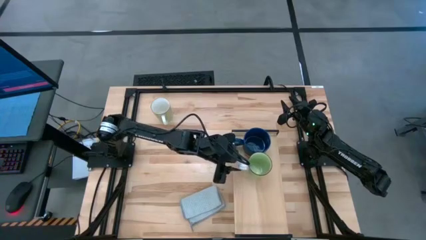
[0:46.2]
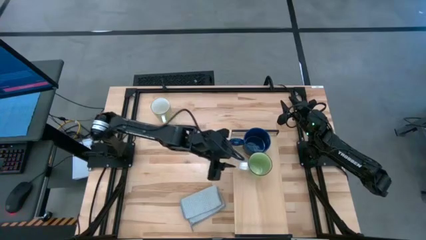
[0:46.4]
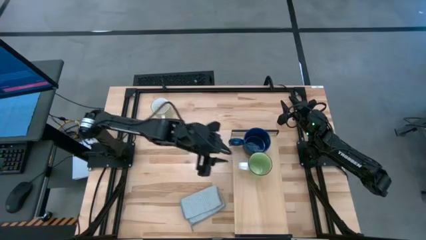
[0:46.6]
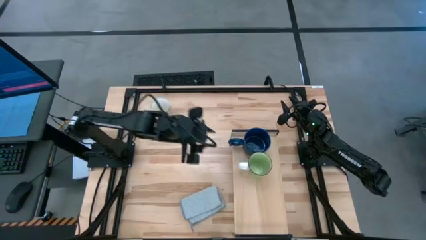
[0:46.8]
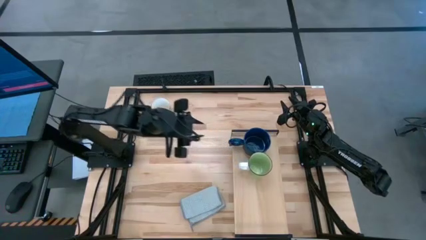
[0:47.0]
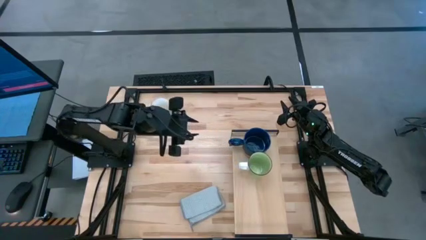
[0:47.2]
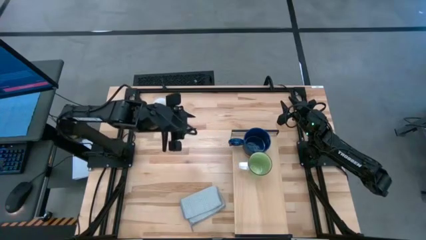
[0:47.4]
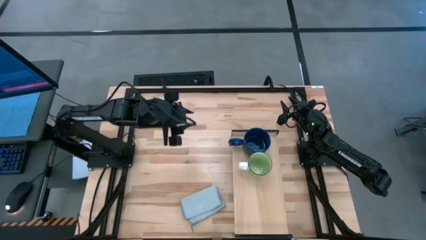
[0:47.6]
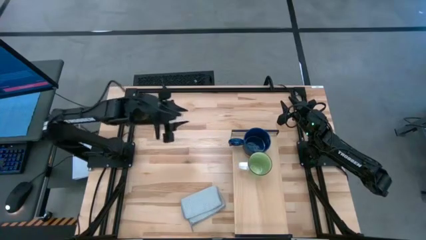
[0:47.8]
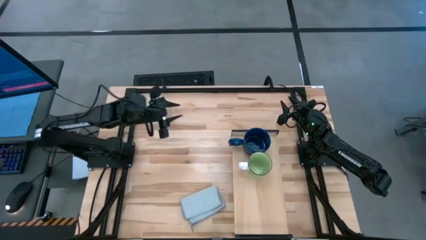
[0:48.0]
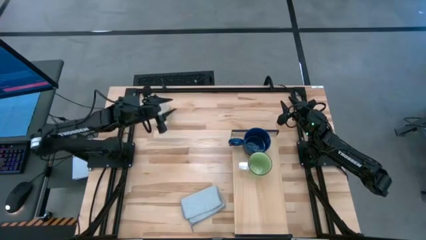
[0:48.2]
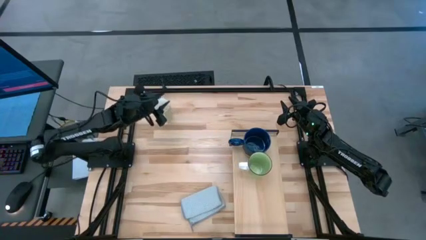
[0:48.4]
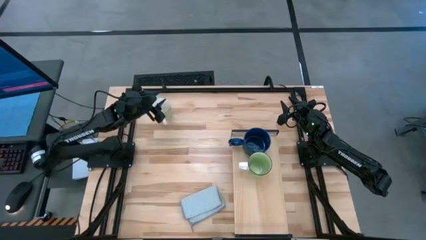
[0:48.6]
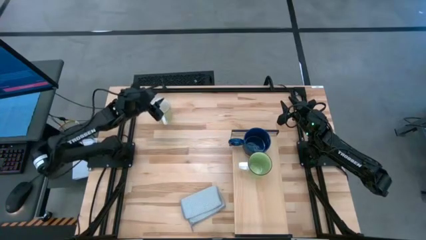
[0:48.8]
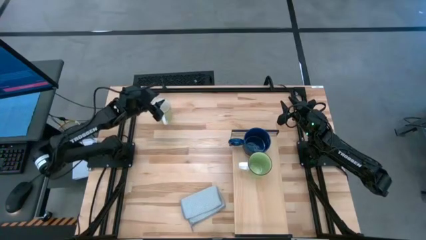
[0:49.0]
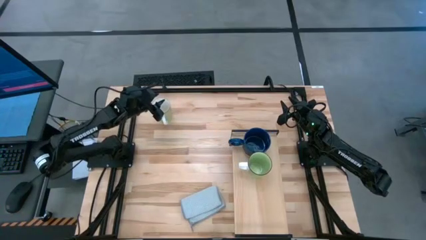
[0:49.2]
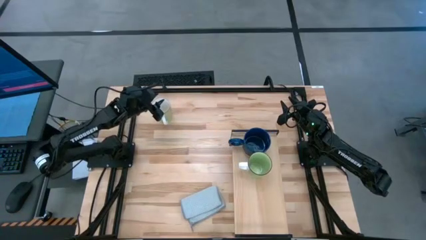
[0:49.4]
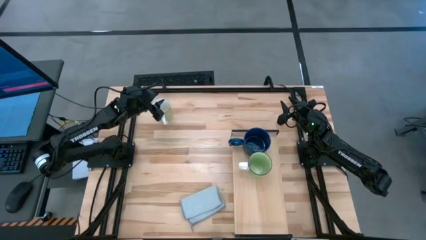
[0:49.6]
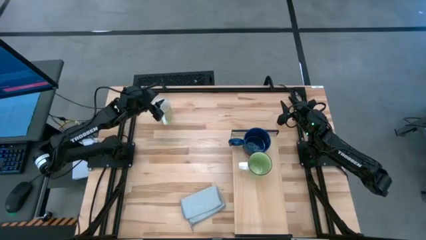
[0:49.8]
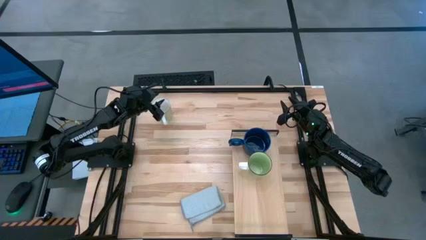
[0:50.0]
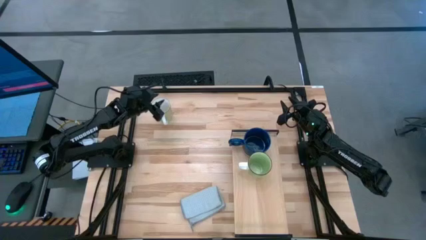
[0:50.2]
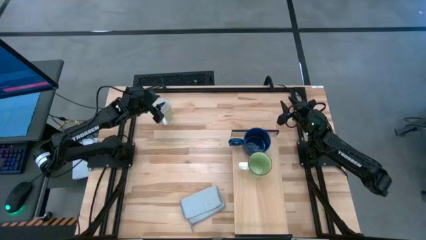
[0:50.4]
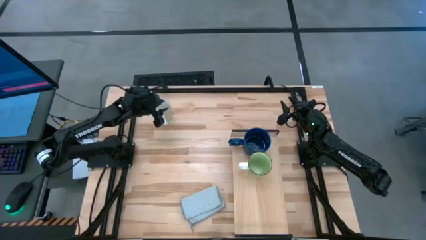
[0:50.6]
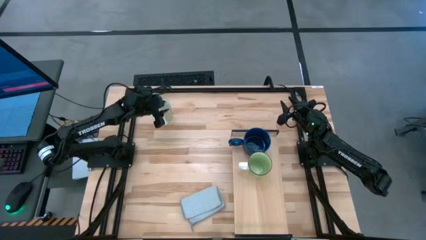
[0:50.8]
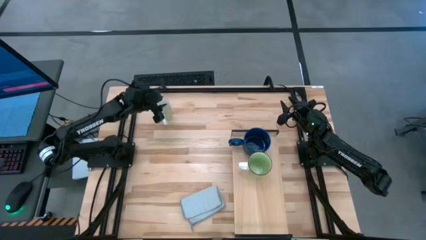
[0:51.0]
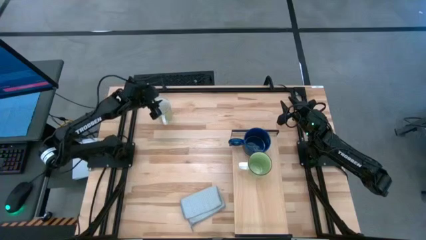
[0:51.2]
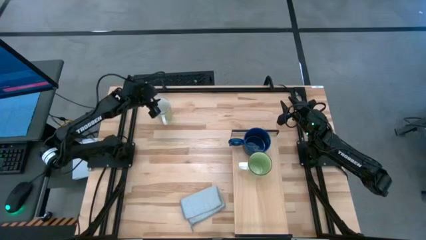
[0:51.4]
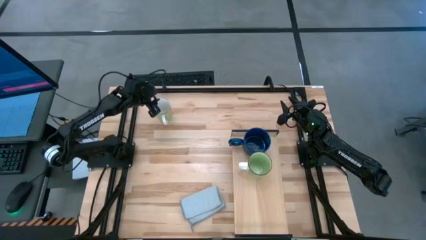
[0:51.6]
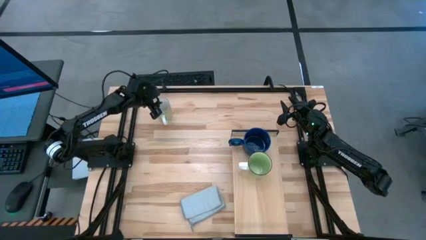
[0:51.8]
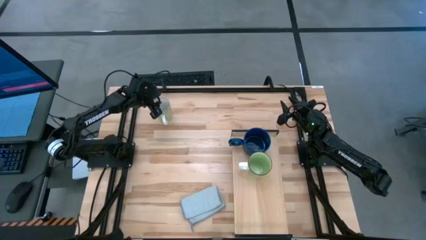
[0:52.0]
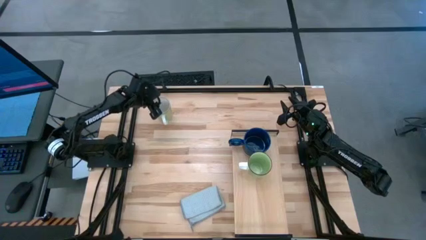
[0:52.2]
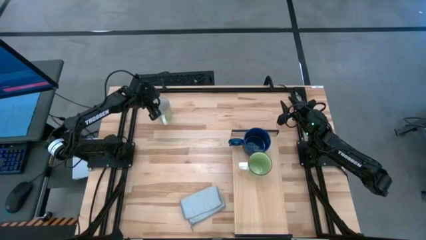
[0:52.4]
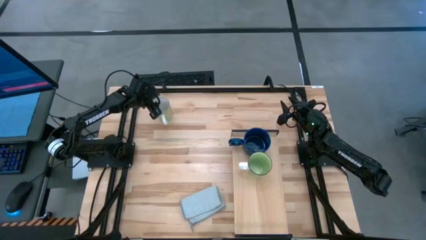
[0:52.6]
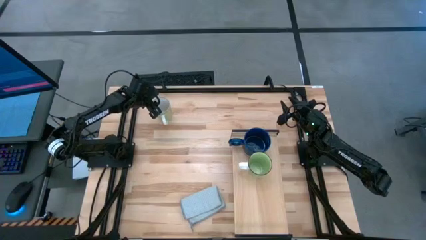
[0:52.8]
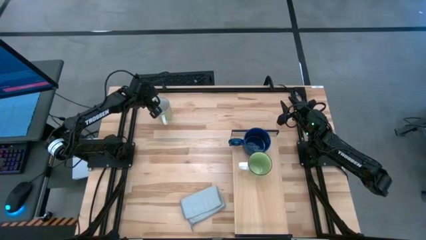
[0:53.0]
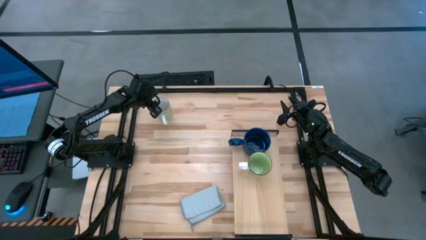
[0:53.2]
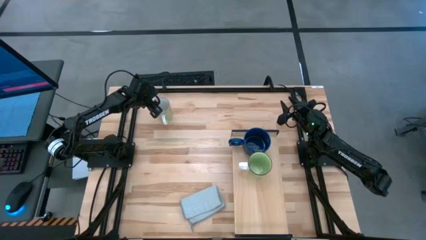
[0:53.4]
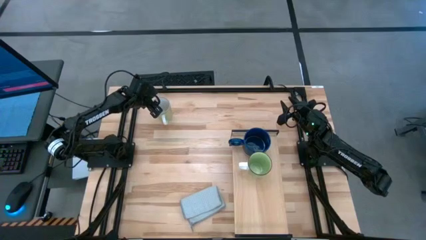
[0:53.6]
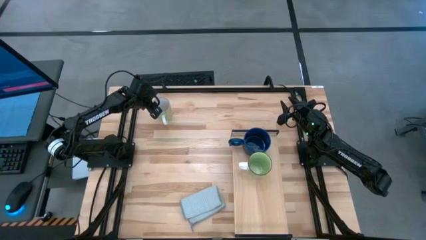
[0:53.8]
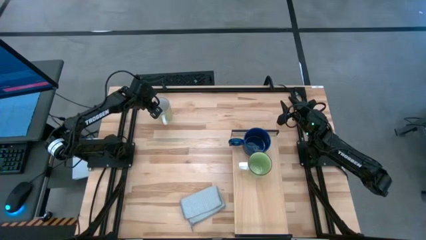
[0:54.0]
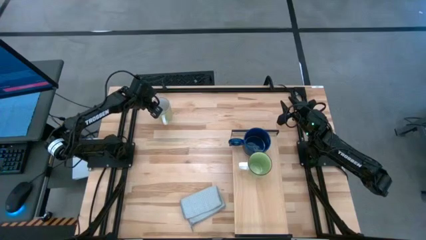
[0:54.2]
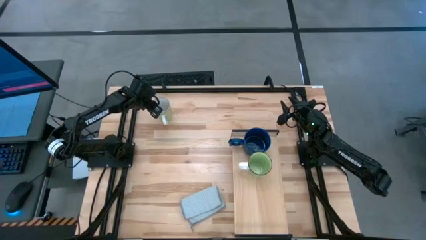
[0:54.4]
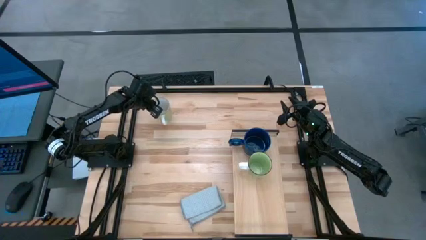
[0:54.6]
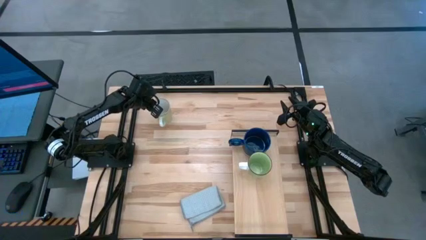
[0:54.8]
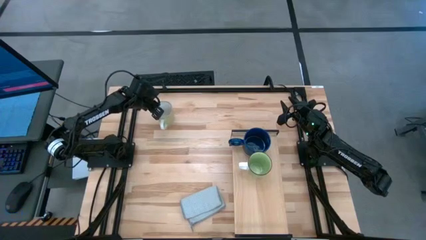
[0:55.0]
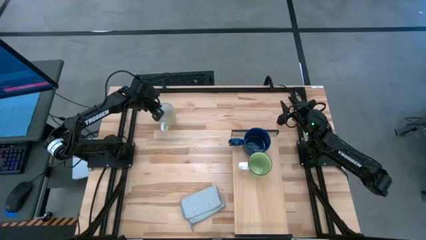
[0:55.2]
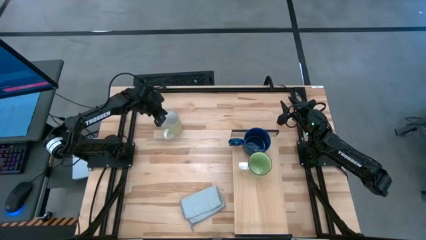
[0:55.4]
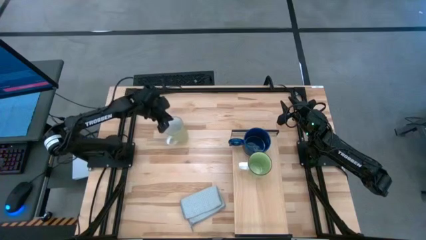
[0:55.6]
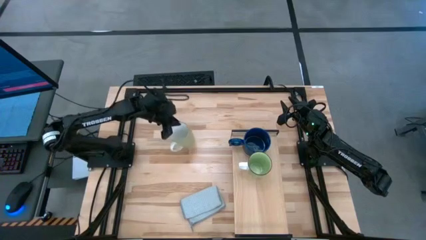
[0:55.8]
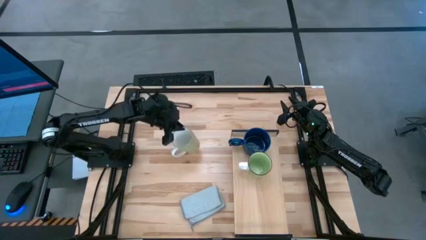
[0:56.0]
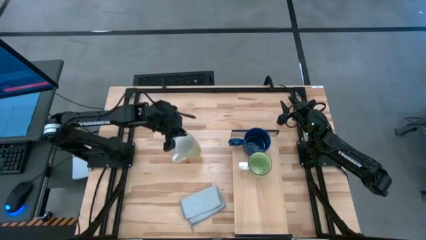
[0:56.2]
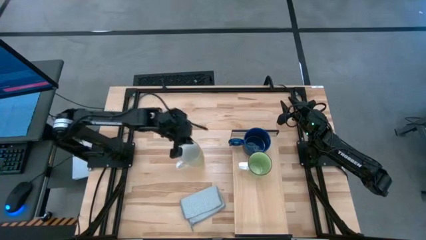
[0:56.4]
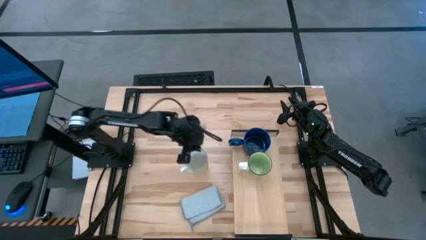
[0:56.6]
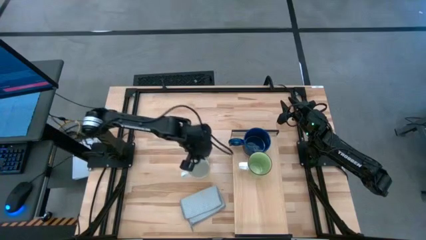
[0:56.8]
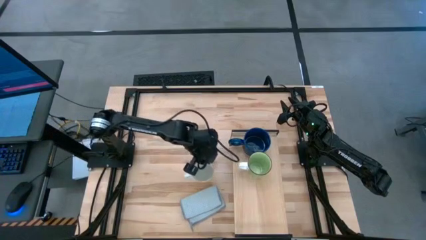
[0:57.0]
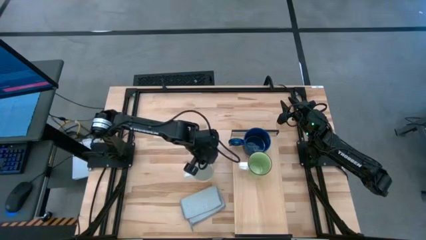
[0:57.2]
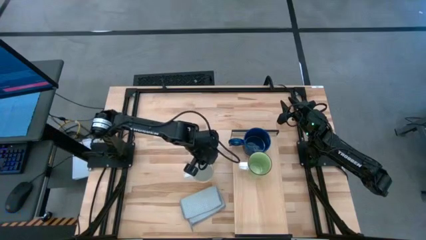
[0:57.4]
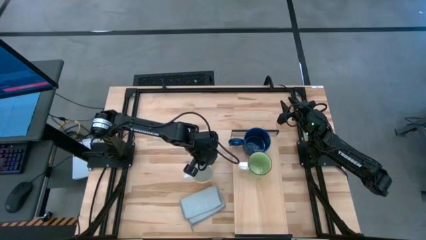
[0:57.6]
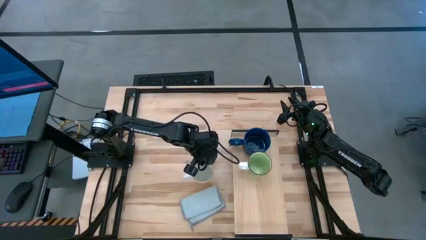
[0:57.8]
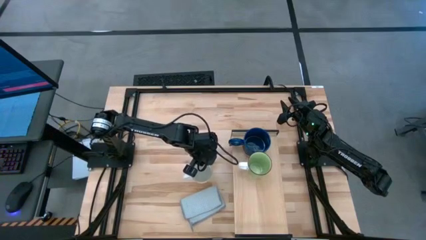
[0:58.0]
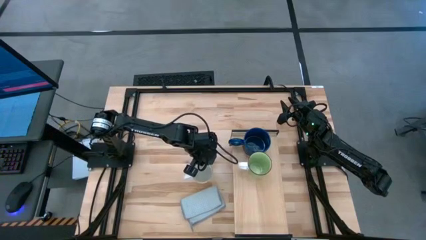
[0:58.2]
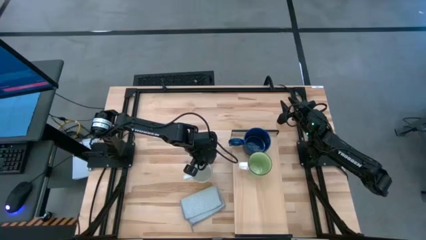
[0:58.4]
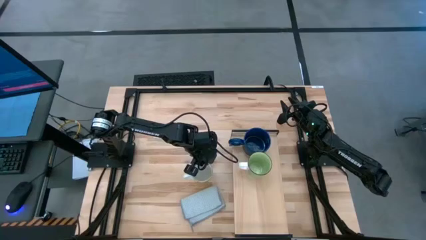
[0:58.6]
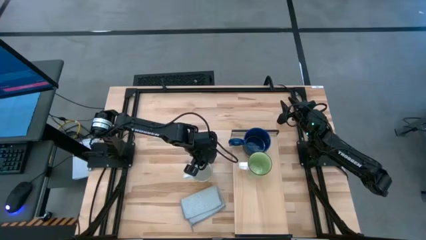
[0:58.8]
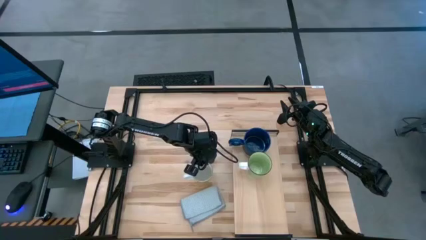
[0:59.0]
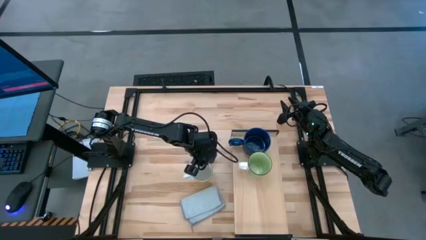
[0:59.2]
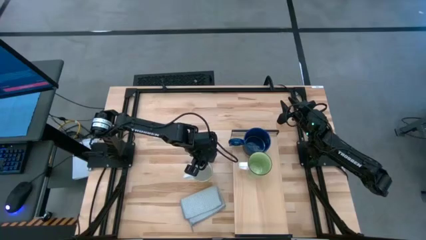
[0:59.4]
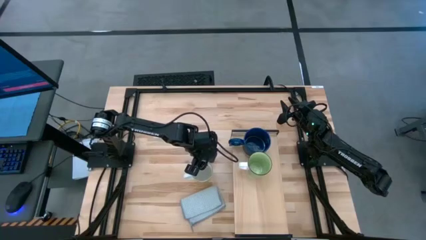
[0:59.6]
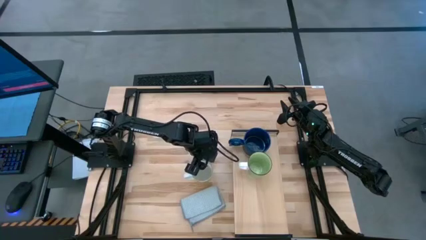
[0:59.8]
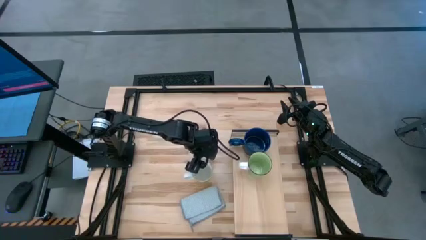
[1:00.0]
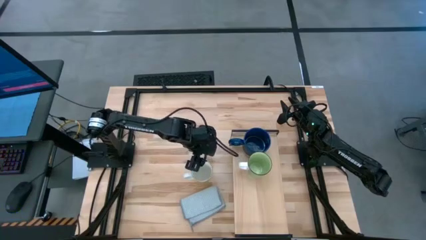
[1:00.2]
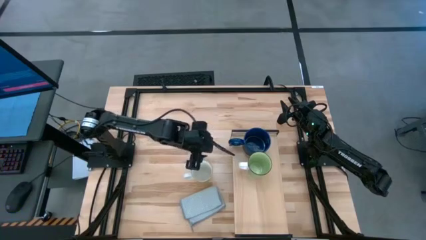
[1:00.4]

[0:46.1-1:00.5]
Task: Stack small to large cups/mugs on shelf
Move the white cup to the center of the table
